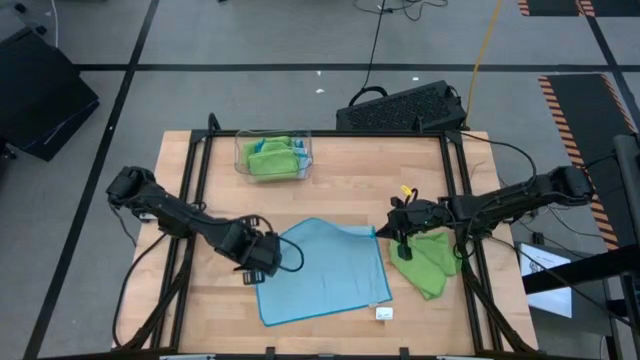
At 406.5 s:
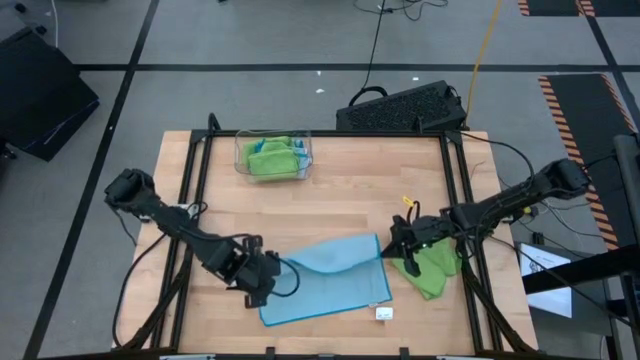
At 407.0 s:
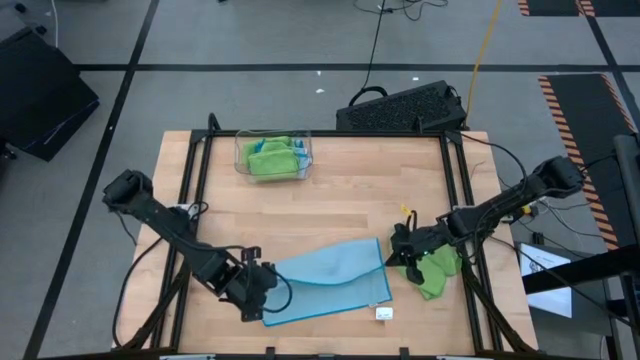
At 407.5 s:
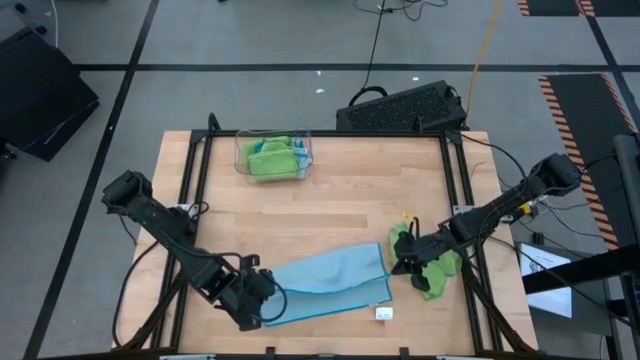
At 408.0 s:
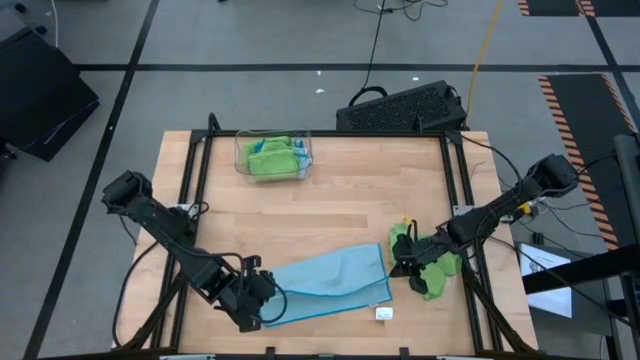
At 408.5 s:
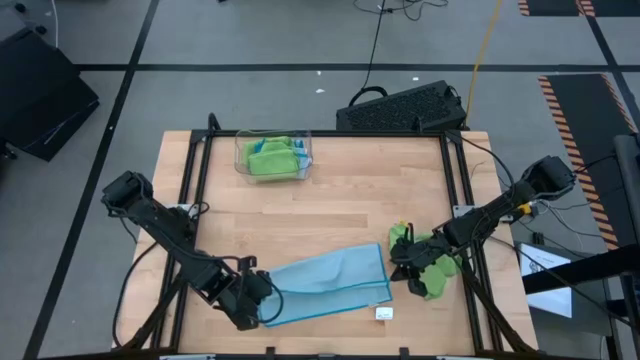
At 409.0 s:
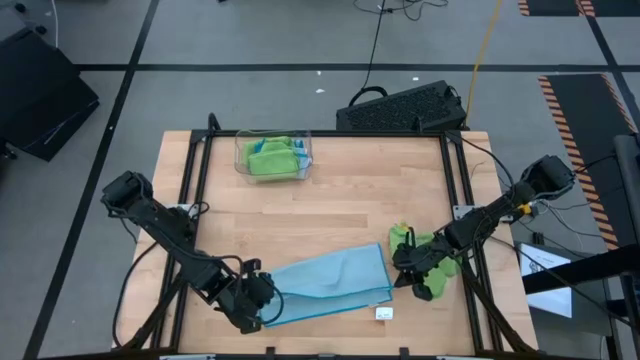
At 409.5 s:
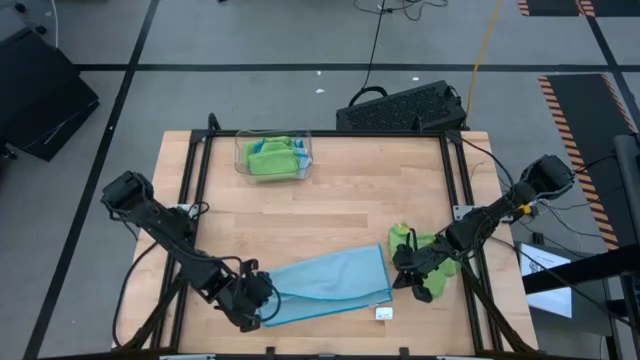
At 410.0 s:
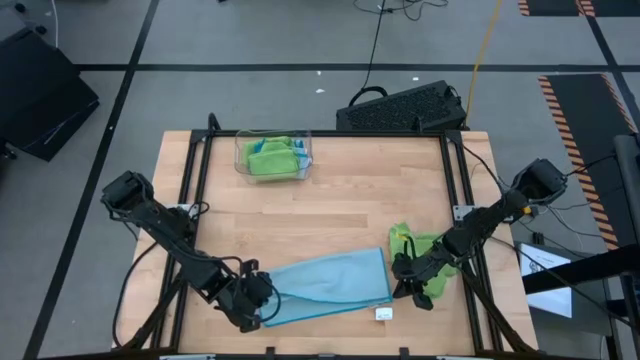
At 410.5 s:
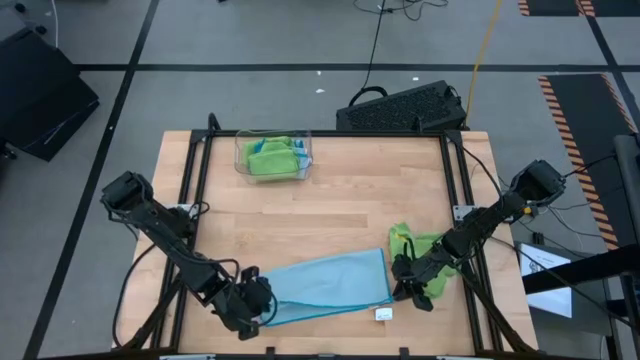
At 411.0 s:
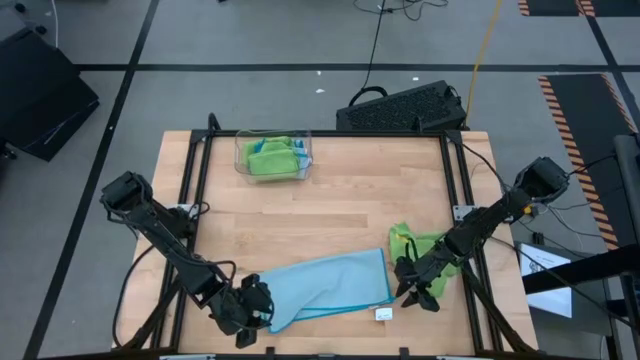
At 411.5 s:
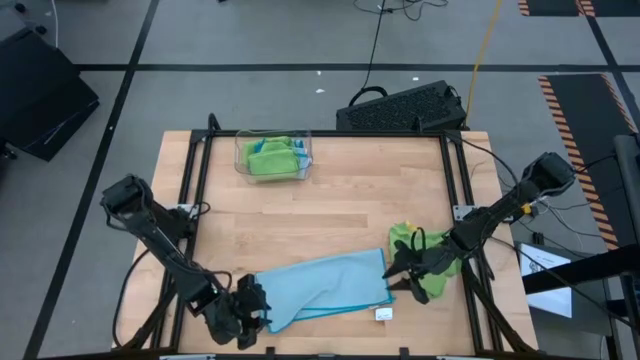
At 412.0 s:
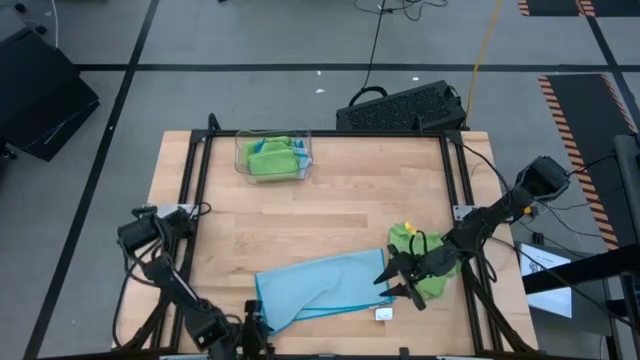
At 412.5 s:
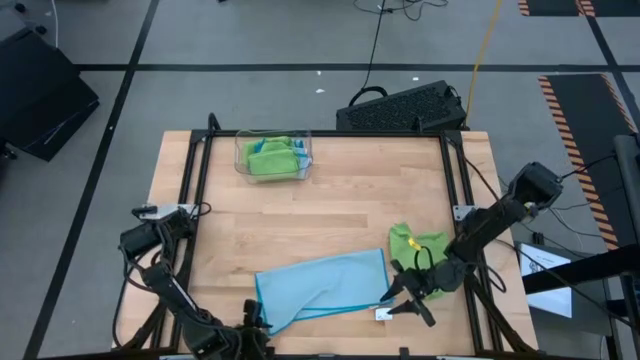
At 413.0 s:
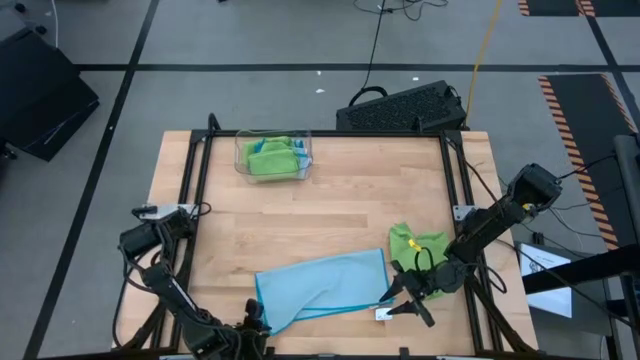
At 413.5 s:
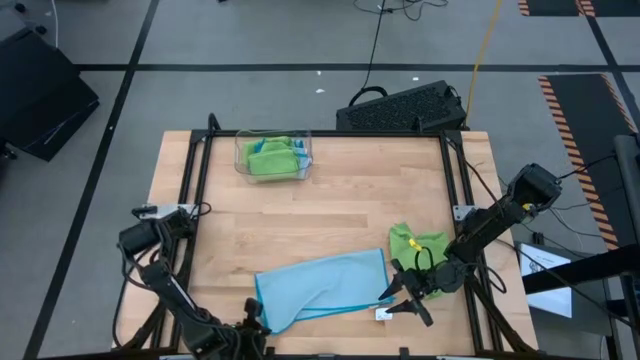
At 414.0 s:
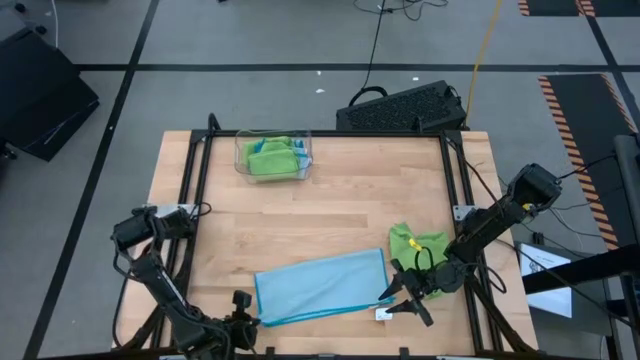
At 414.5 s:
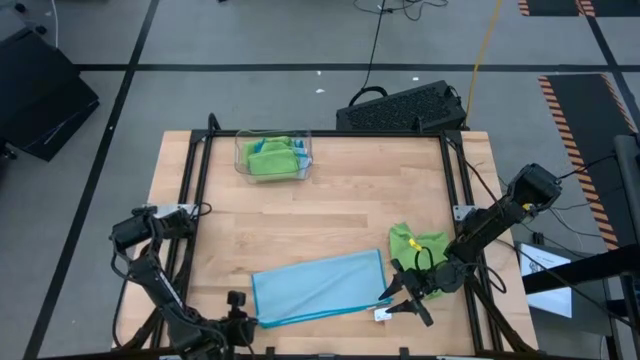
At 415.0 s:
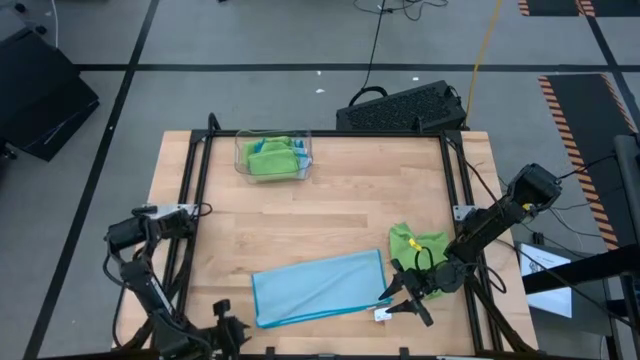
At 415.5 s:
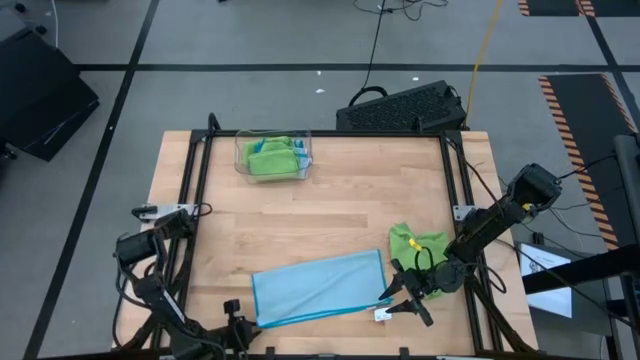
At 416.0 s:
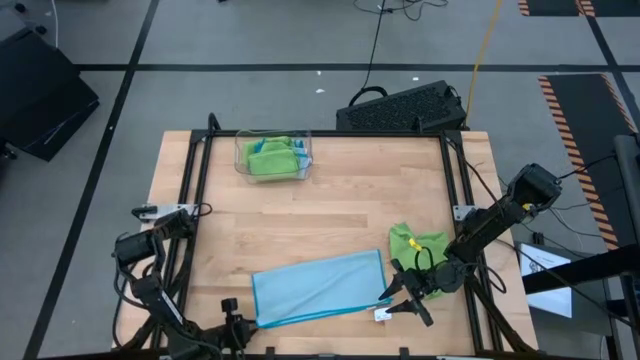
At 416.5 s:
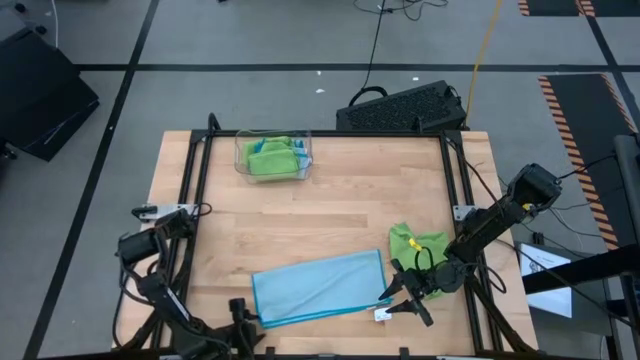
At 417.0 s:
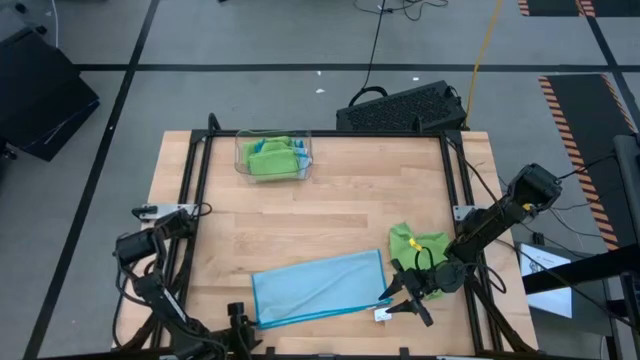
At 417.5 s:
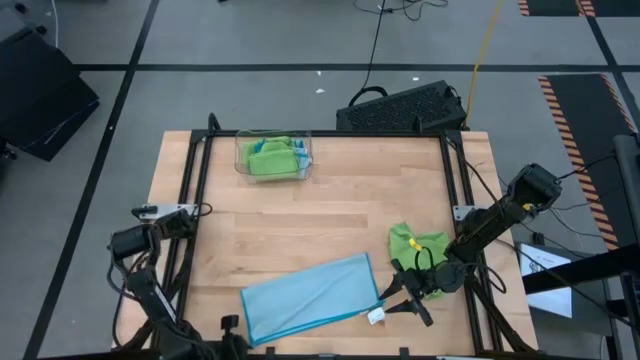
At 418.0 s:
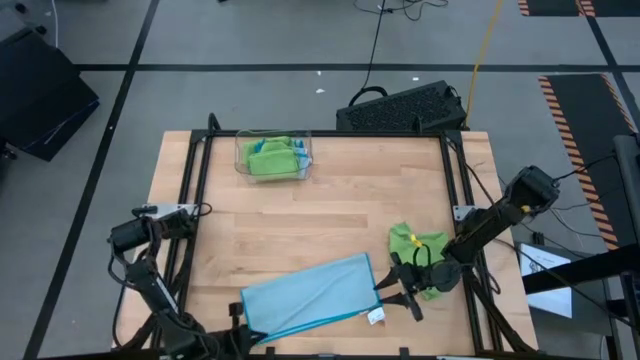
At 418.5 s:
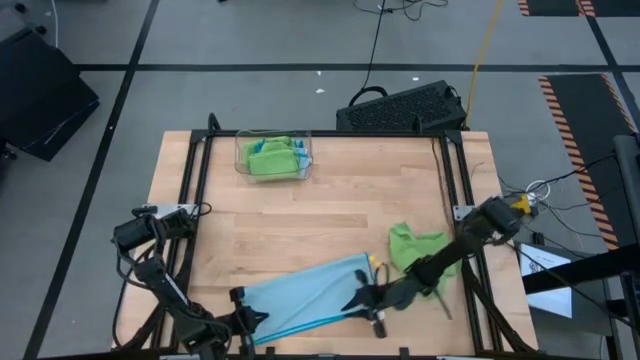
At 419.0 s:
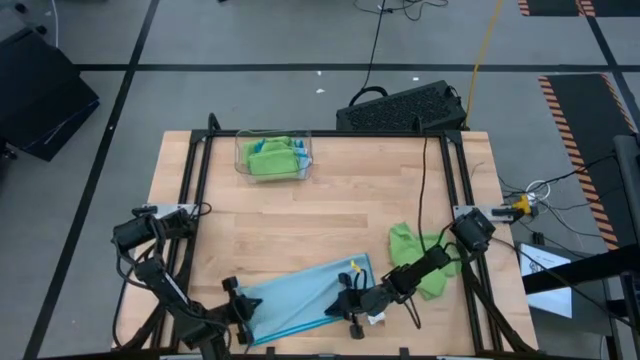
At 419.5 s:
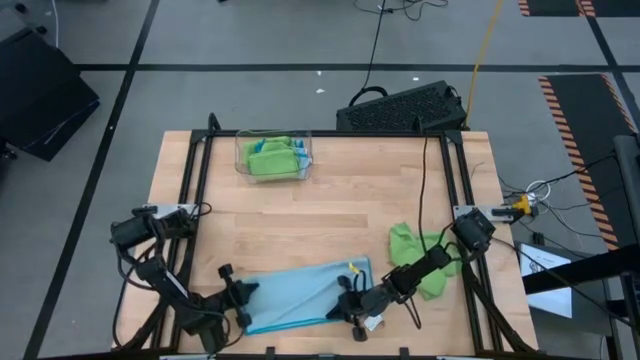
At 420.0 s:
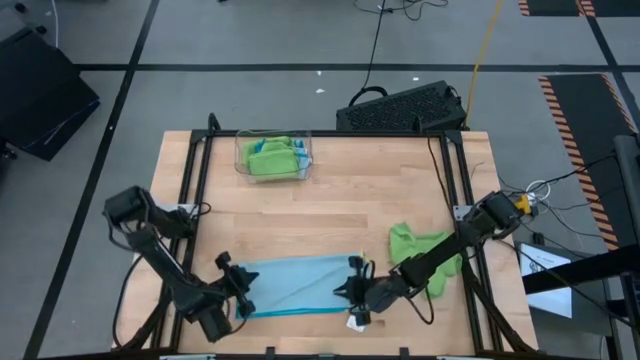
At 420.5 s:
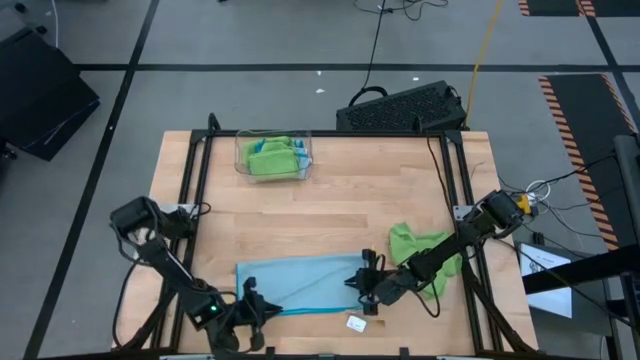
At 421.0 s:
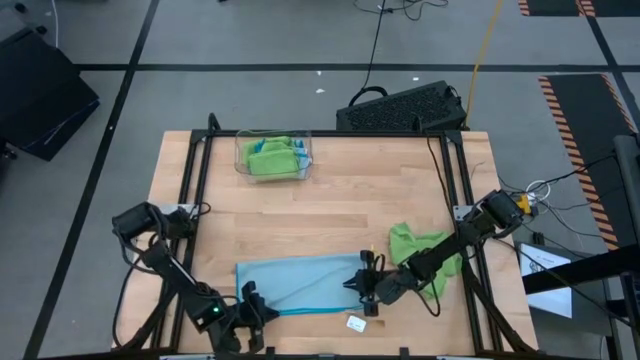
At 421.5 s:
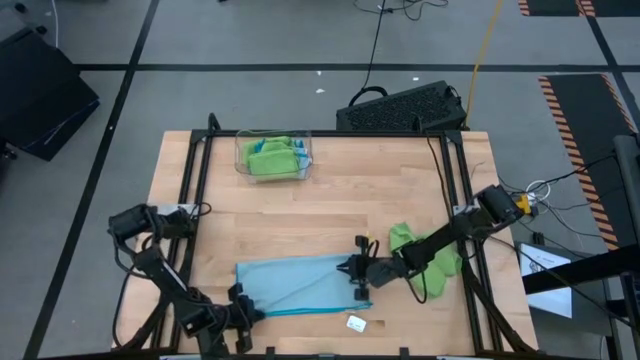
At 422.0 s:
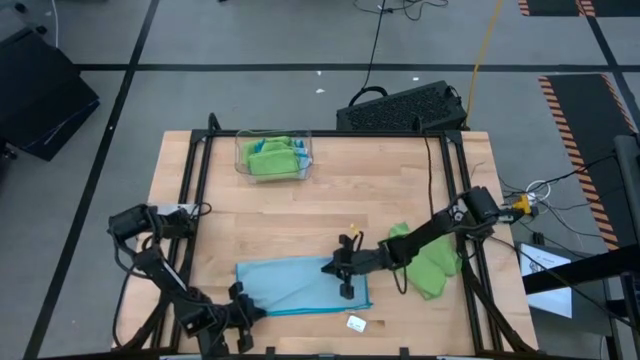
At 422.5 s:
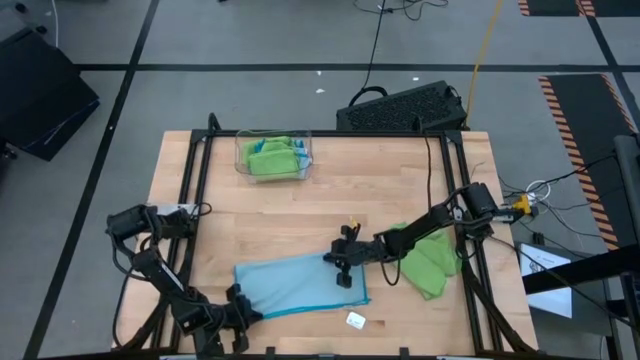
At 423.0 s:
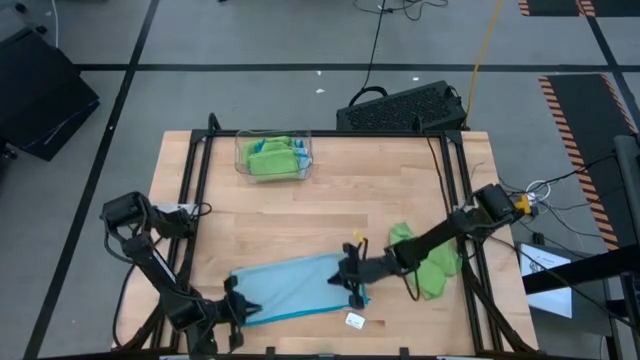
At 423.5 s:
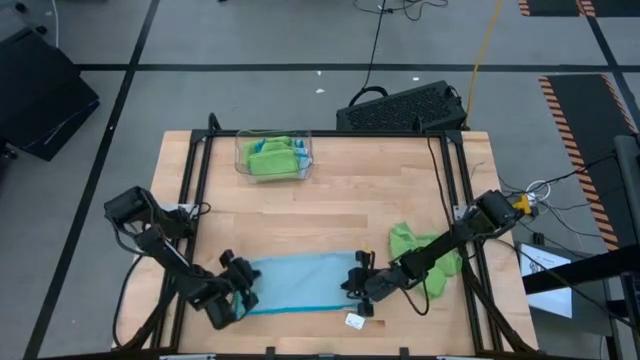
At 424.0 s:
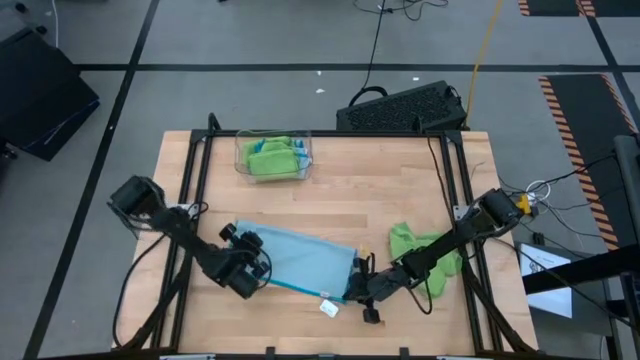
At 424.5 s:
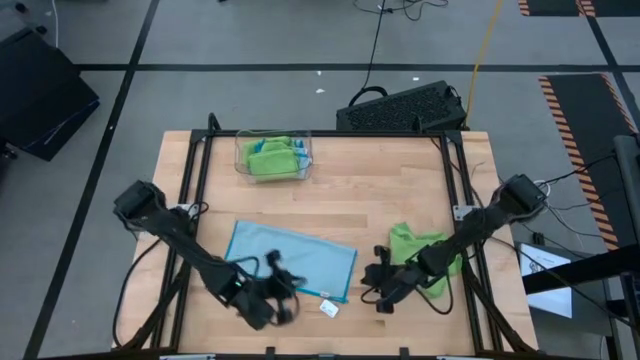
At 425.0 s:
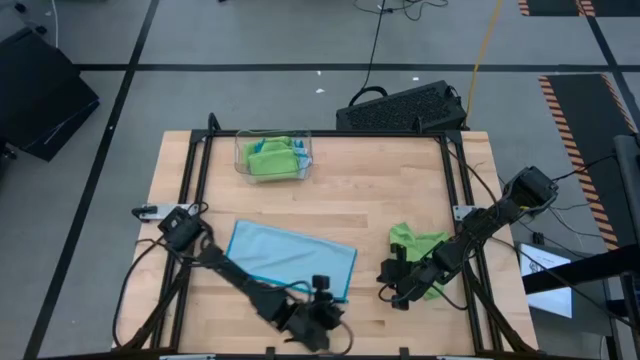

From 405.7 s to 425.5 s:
Task: Fold microfiber towels
Fold the blue microfiber cloth

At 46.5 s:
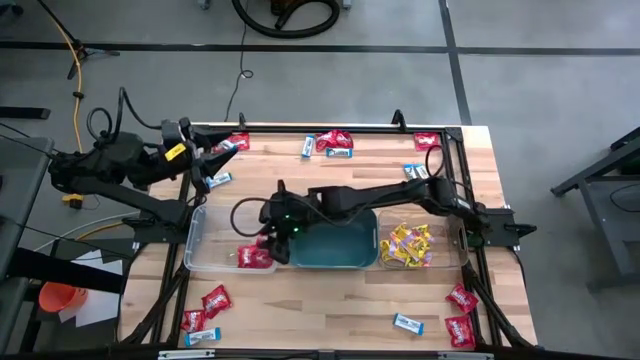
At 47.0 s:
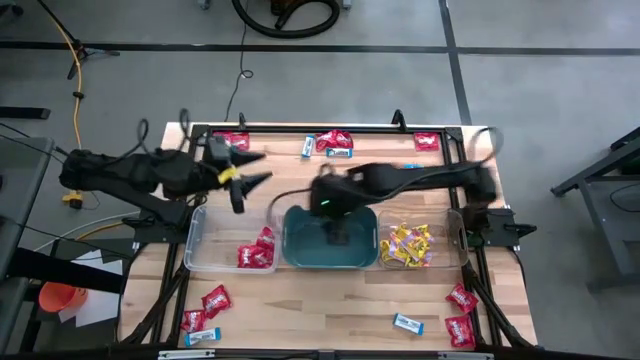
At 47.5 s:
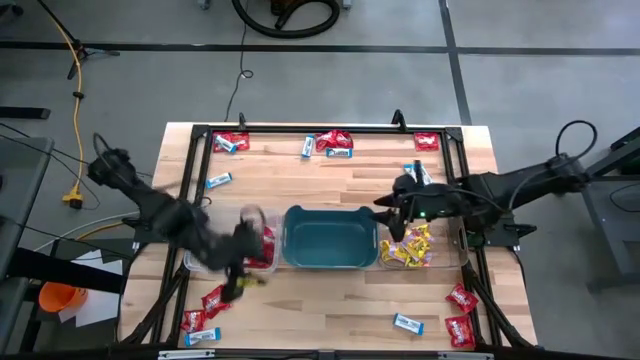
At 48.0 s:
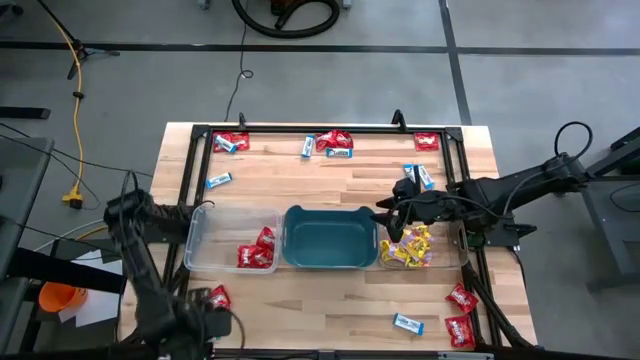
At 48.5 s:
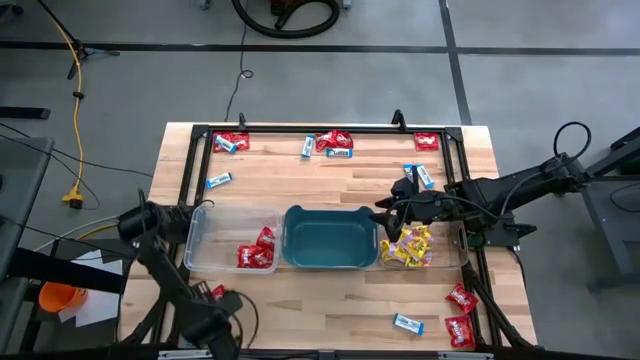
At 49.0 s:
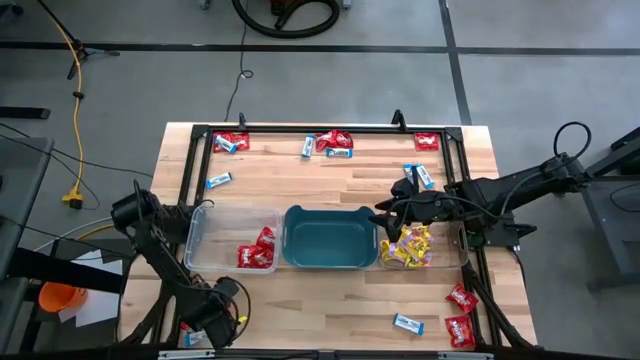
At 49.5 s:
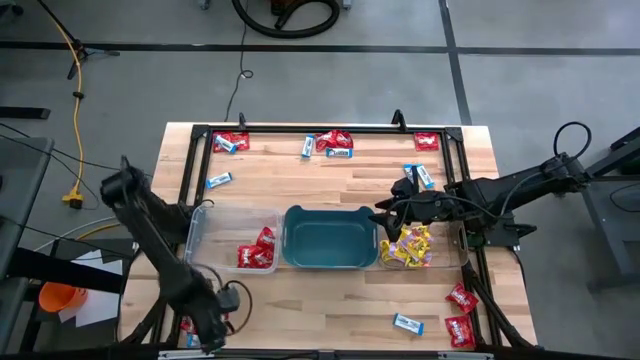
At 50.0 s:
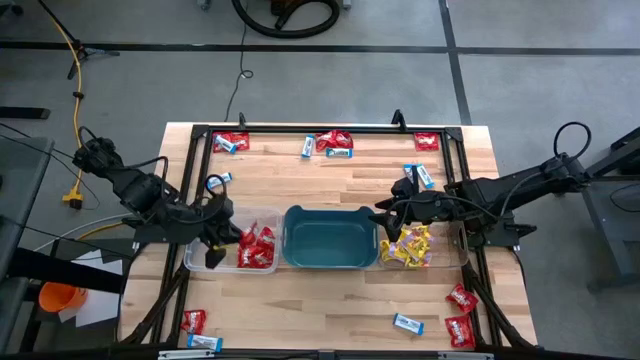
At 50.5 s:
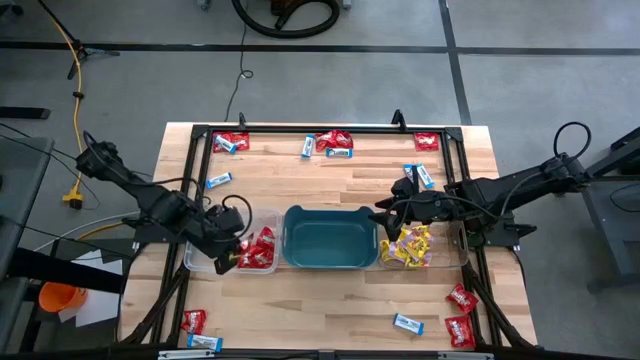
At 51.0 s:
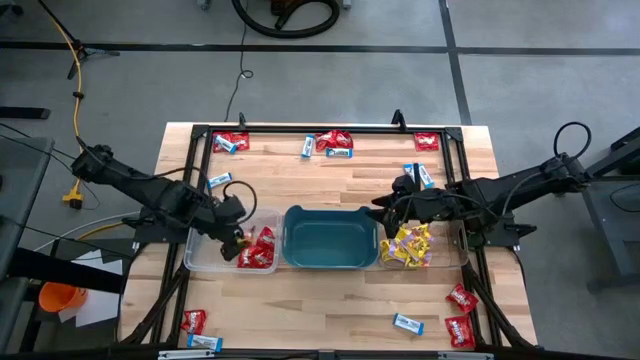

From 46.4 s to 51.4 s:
Task: Sort candy
Put the red candy into the left transparent bin
